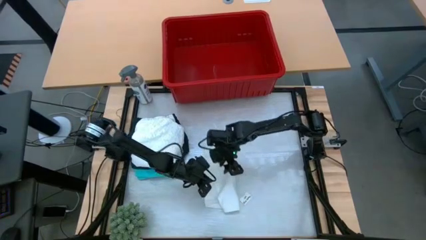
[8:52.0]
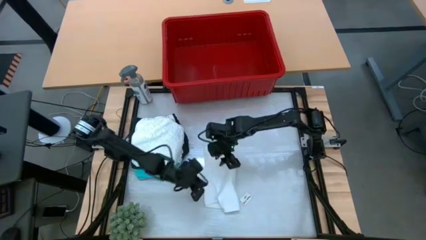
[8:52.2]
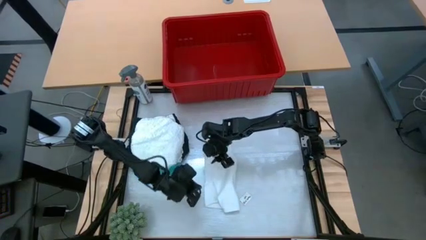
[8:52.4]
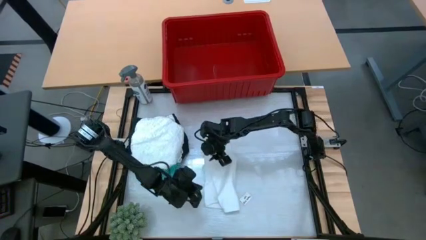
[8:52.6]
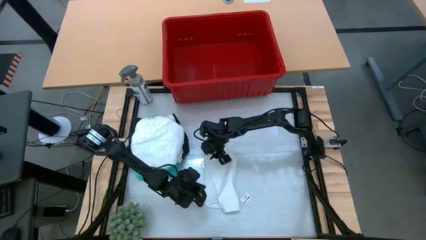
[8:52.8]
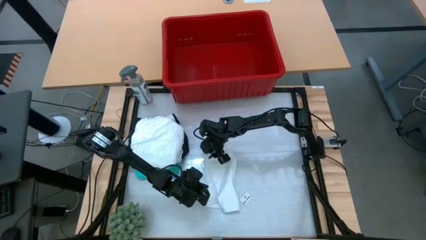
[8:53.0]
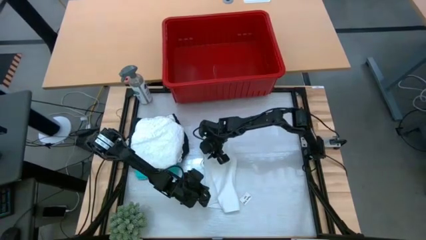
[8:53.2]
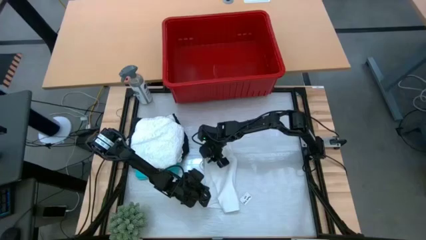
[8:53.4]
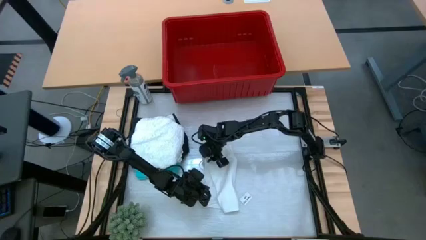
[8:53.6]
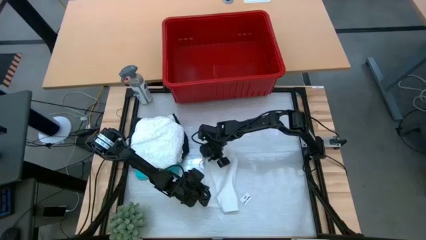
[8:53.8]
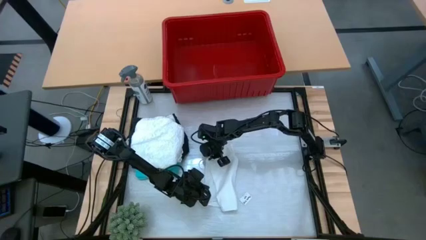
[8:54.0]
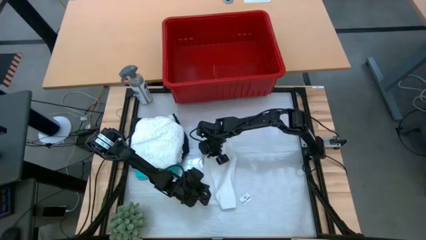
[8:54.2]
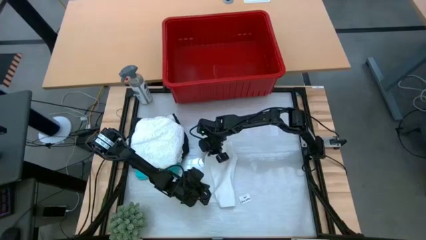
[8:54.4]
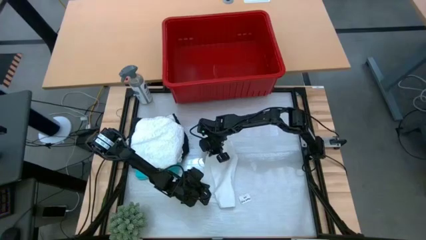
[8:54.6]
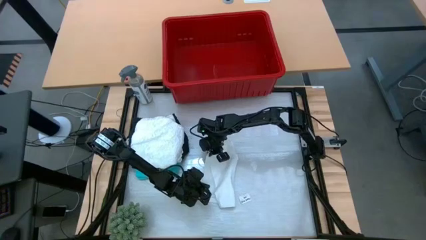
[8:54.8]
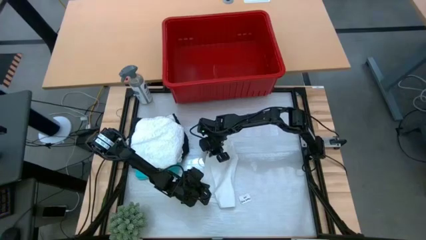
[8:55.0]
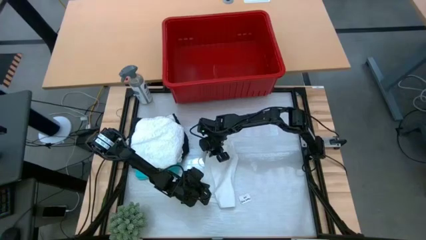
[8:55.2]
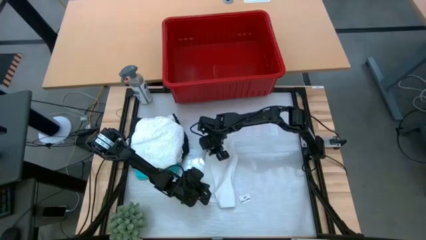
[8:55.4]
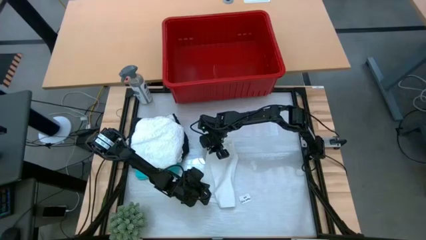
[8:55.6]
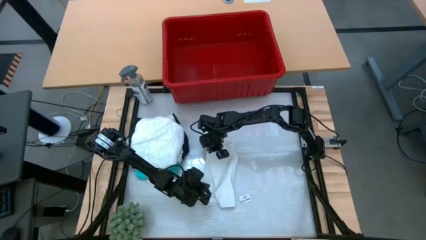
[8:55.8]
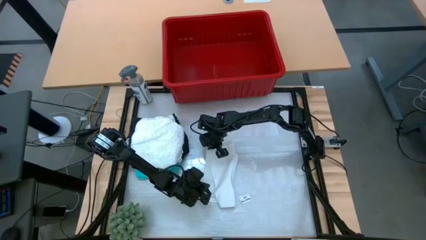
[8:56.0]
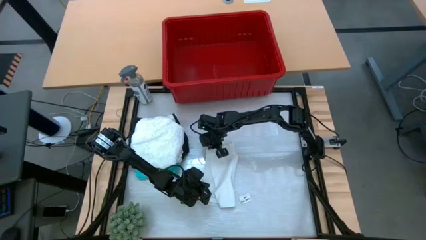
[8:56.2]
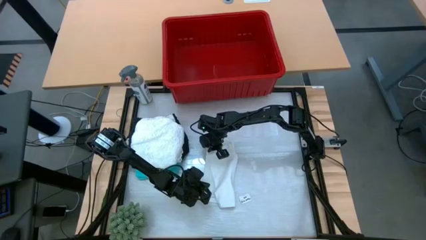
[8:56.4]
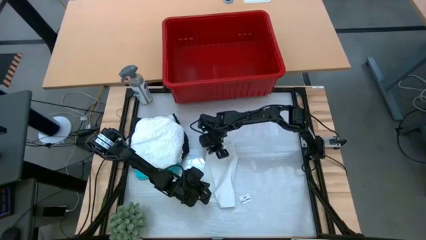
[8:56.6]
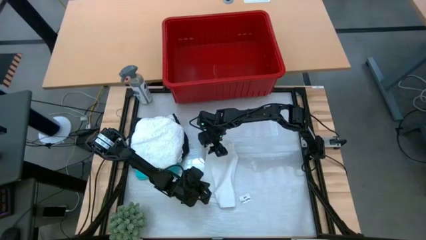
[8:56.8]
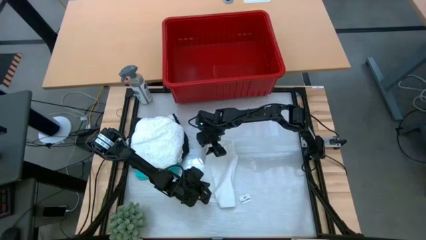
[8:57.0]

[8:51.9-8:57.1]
Task: Fold laundry
Fold the white shorts

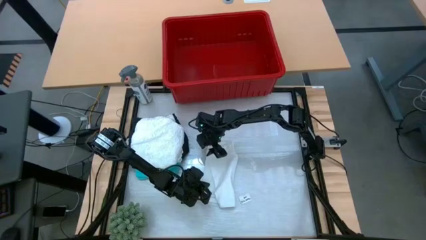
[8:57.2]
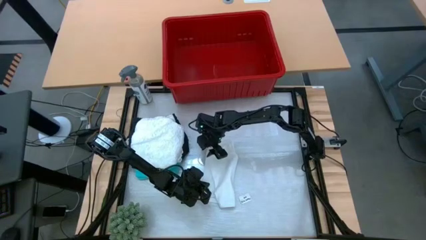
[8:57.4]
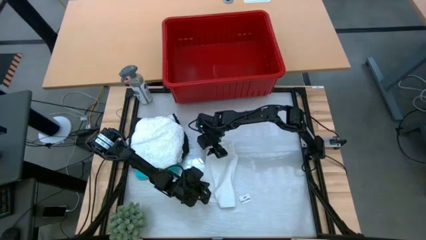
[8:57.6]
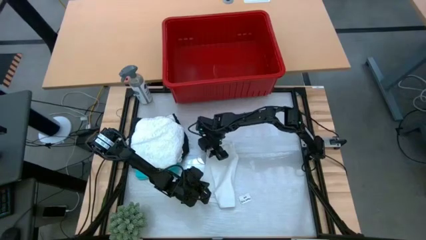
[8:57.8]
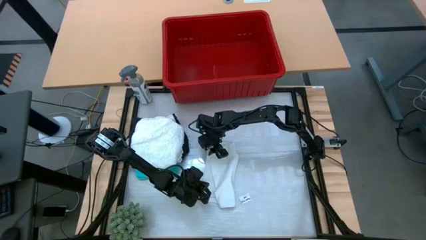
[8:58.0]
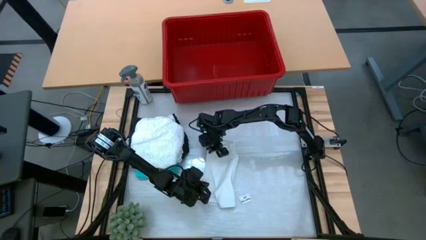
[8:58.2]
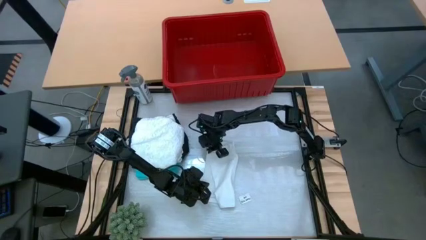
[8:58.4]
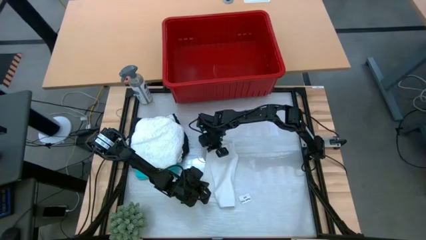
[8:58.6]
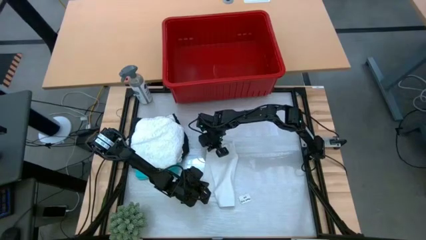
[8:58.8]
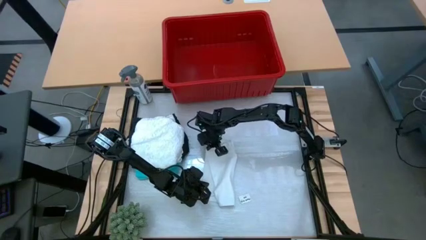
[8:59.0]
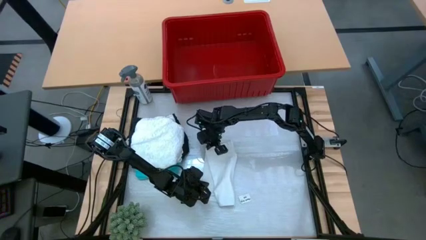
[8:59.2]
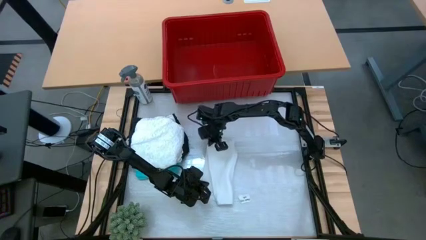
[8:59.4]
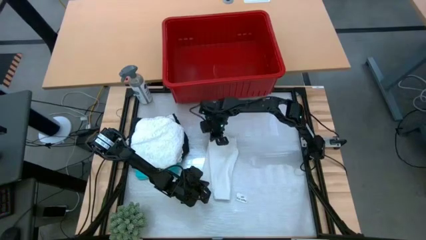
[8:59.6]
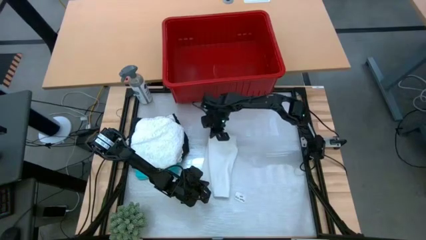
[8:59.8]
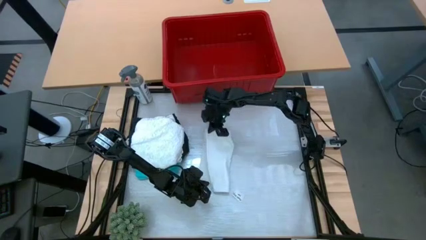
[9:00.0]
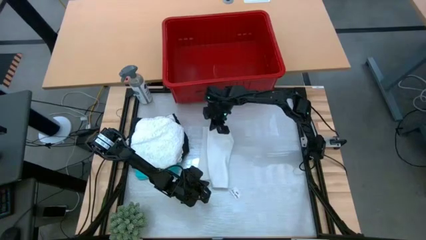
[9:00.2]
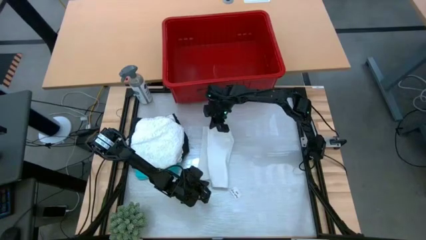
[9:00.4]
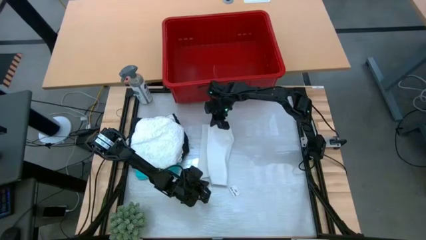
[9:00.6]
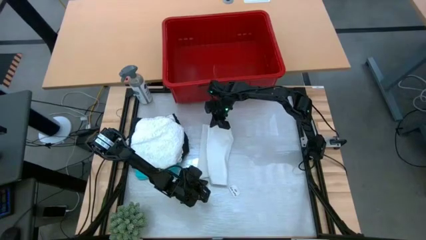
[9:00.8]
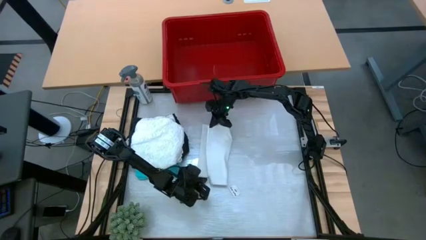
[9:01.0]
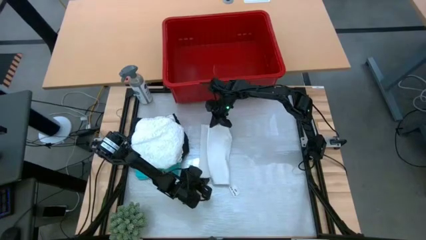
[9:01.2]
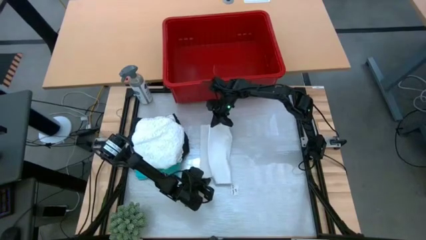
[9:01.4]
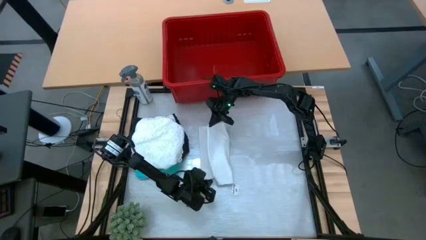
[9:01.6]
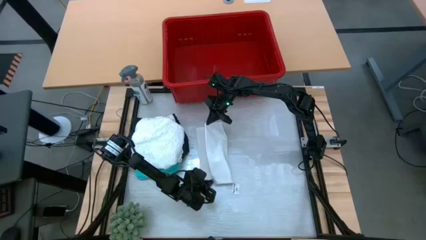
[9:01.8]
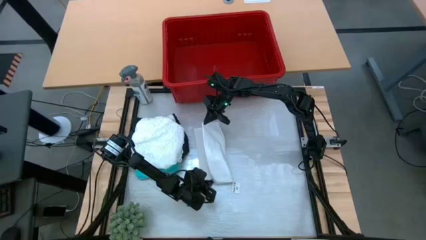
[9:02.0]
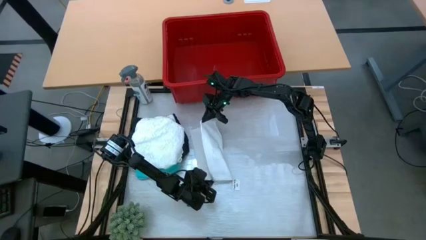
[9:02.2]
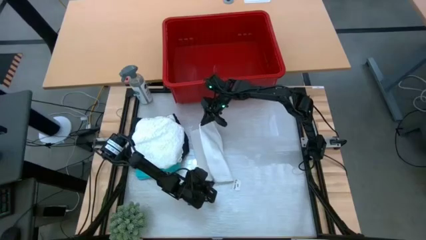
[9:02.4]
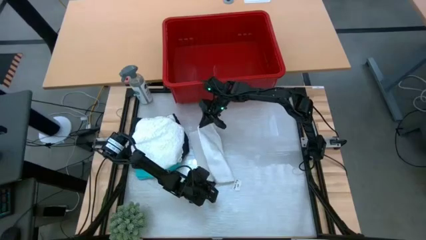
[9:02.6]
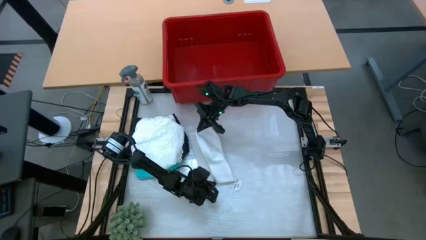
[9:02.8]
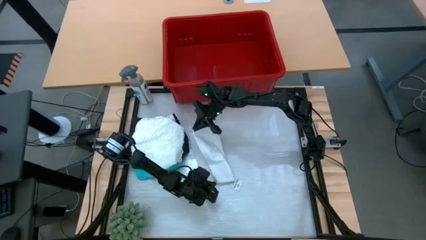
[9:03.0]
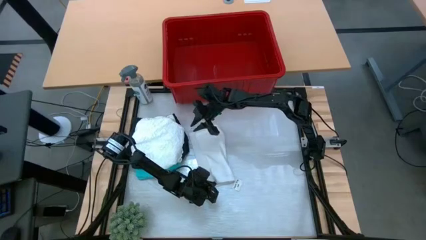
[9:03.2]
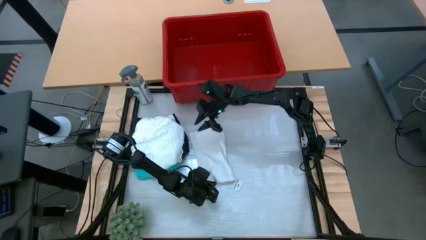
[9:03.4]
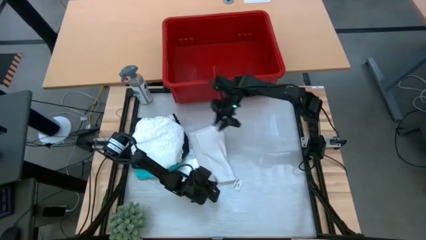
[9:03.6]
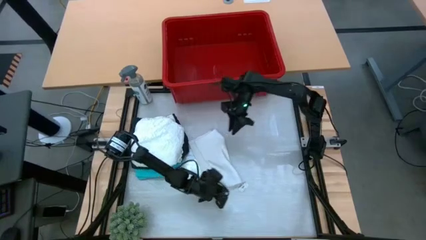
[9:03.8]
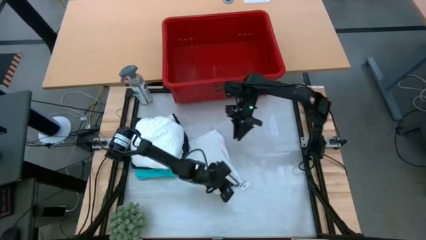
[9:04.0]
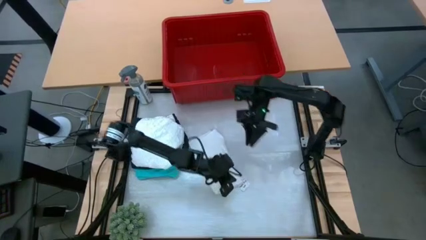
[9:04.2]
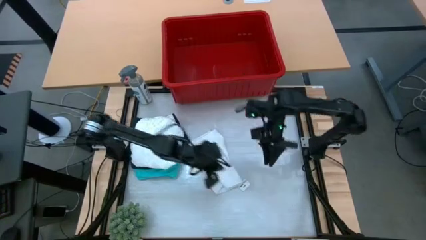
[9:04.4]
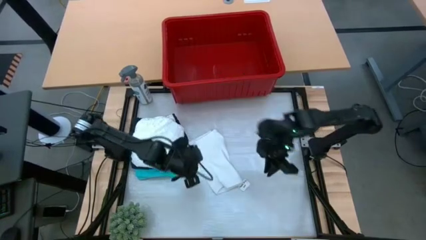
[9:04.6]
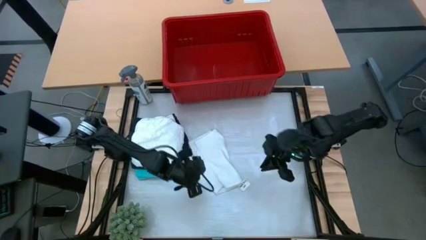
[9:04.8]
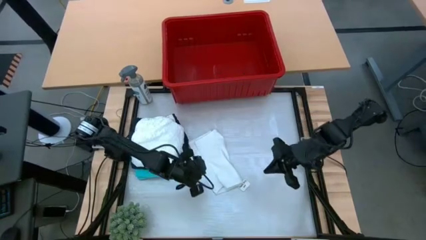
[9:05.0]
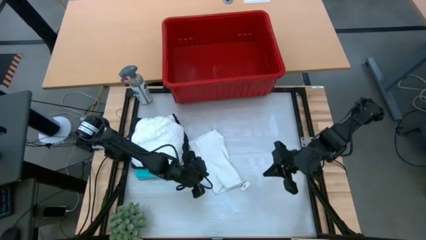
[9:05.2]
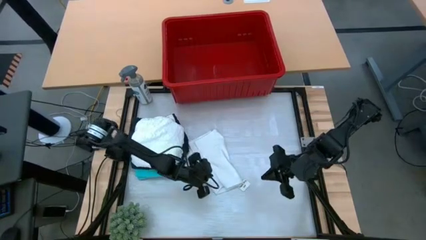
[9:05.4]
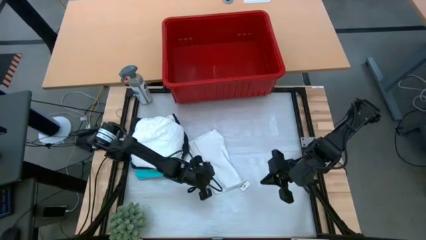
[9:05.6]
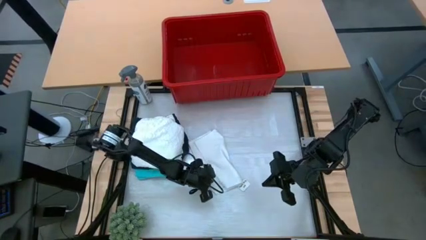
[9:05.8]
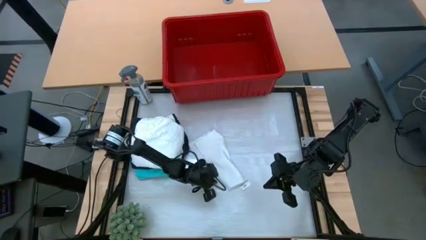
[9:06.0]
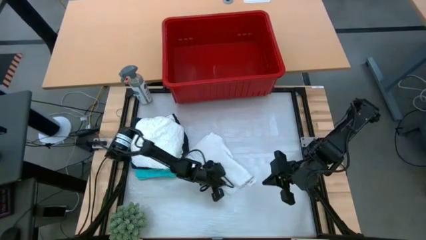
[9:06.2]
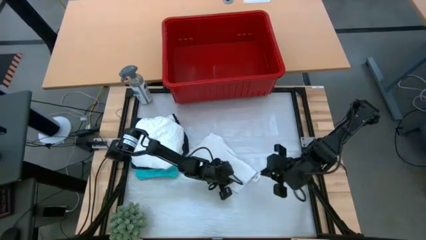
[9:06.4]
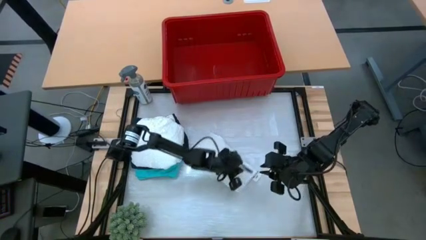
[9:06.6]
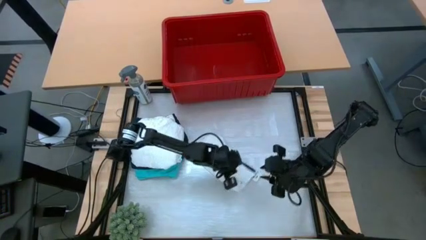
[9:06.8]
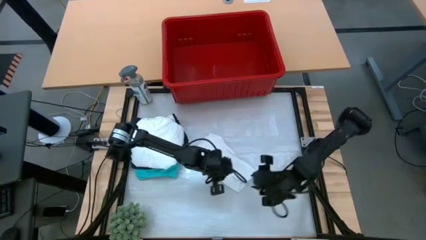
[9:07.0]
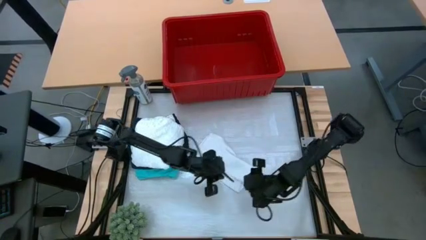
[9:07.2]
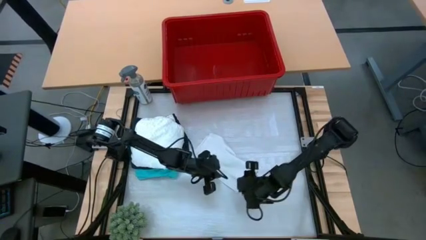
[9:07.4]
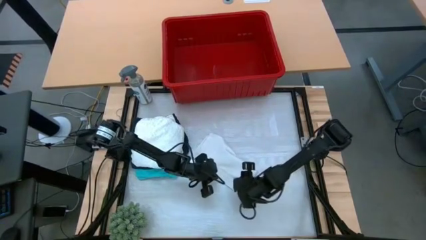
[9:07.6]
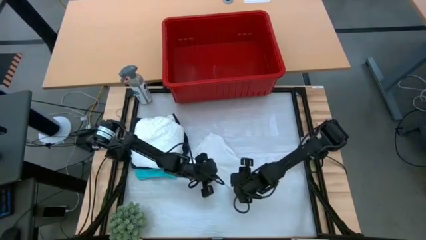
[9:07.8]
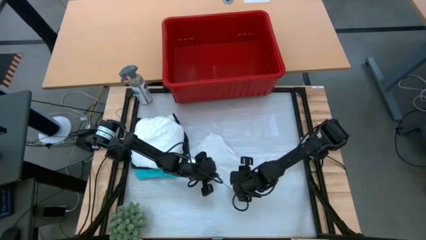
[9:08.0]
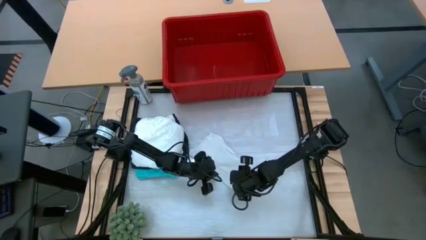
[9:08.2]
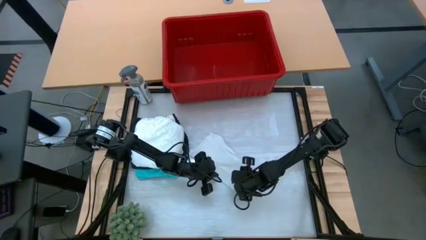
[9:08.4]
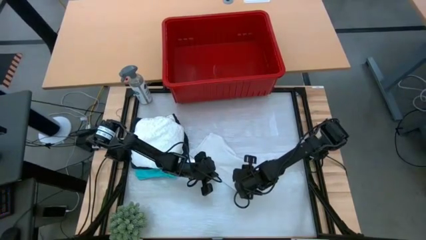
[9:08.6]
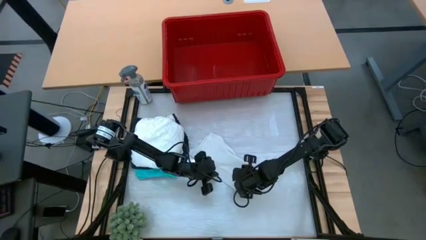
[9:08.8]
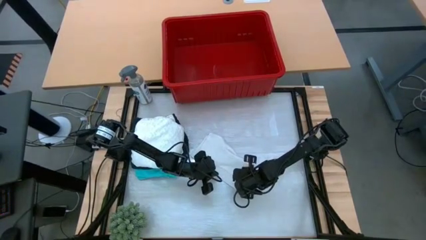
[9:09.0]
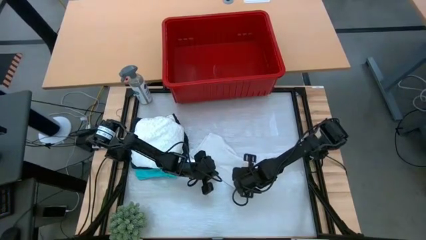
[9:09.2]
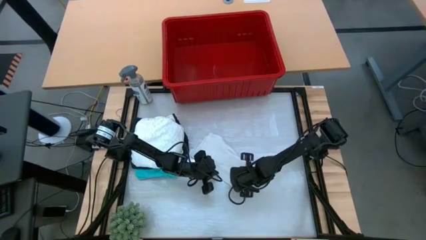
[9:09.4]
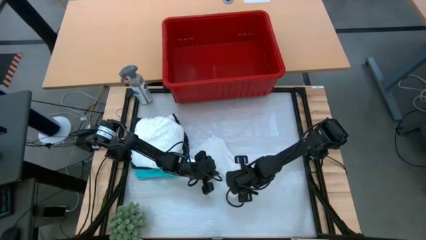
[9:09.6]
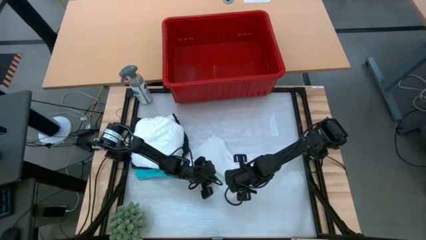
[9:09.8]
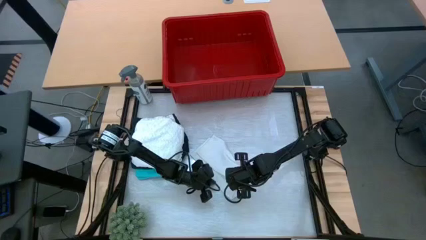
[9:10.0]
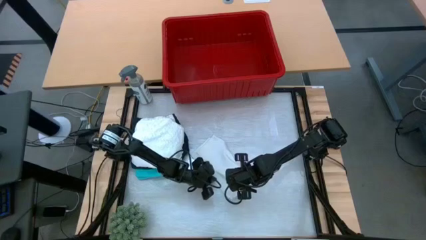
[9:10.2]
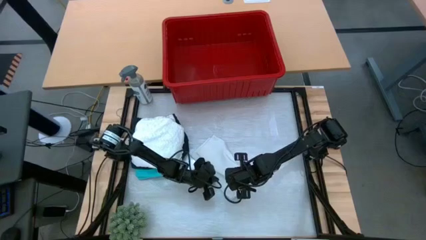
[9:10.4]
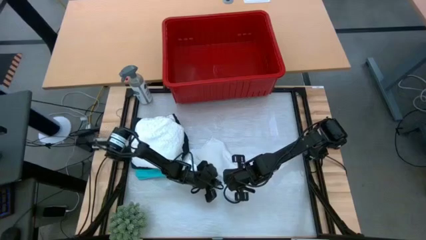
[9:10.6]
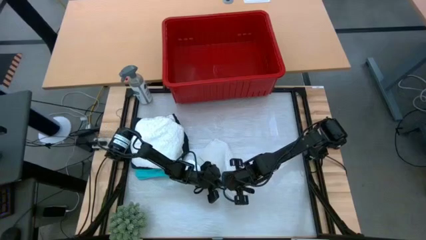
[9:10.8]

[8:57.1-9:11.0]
Fold the white shorts
